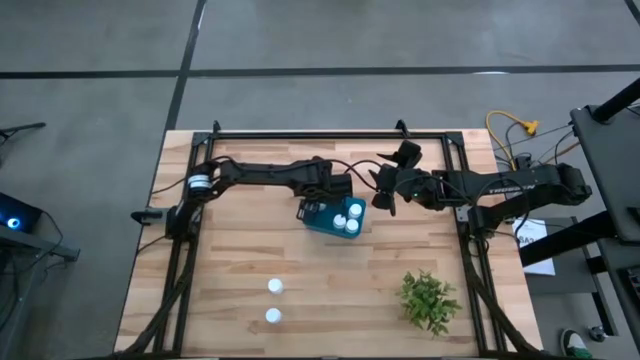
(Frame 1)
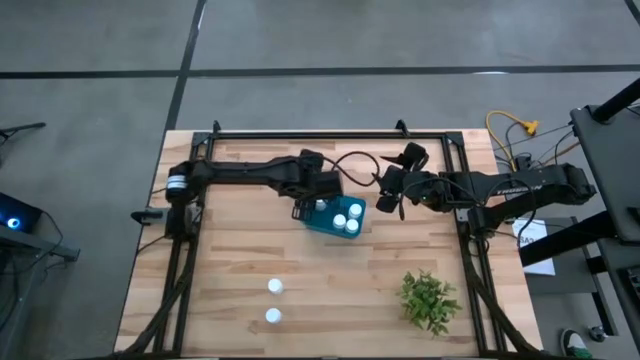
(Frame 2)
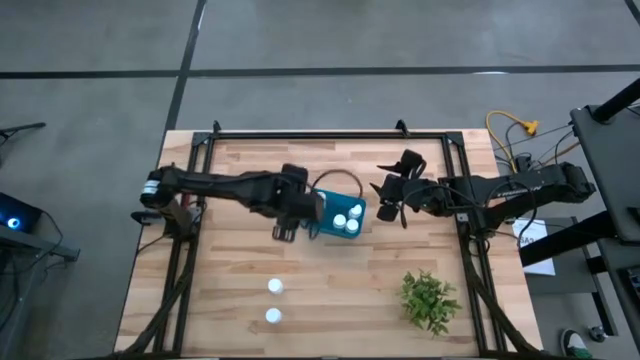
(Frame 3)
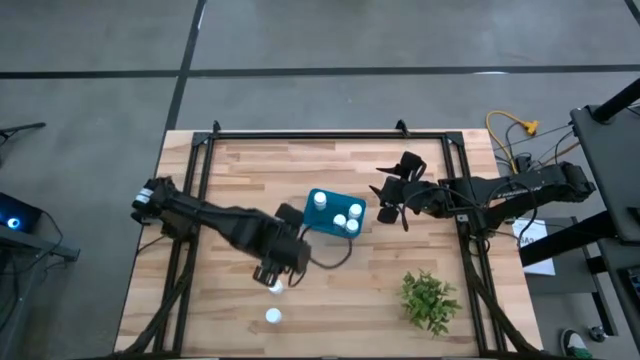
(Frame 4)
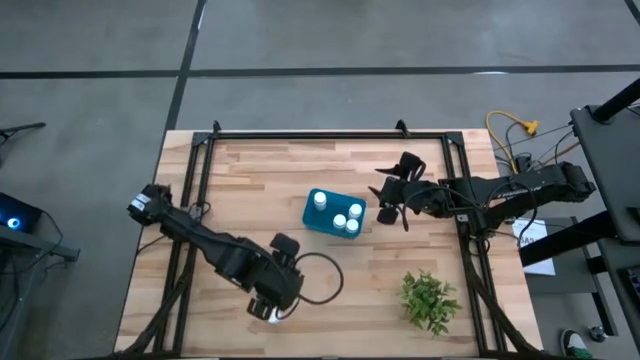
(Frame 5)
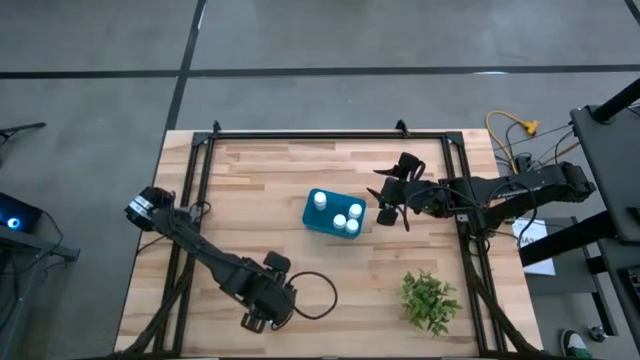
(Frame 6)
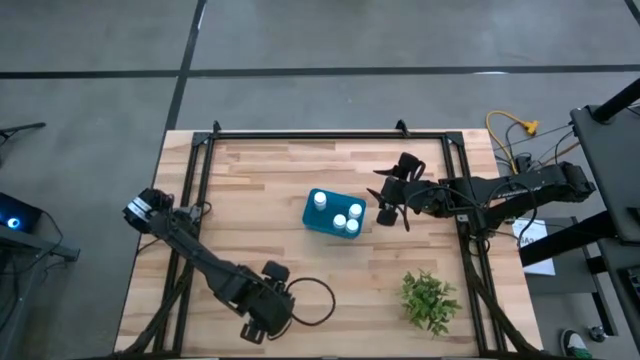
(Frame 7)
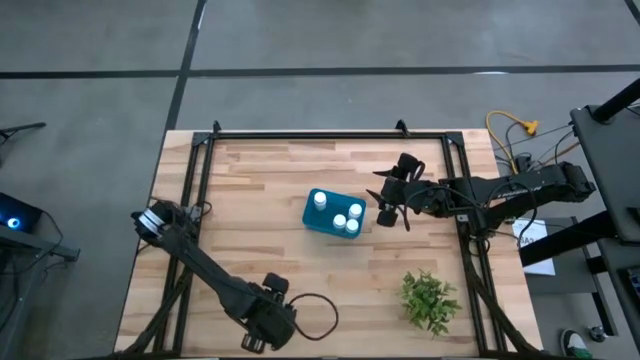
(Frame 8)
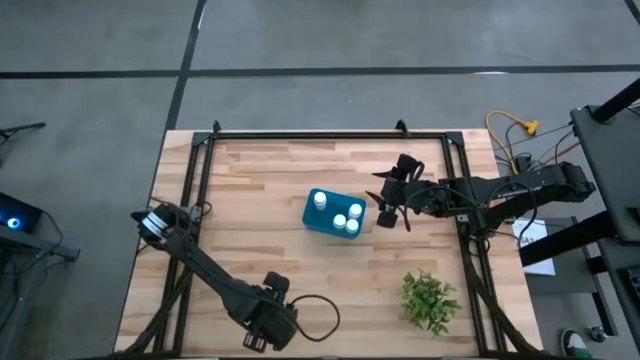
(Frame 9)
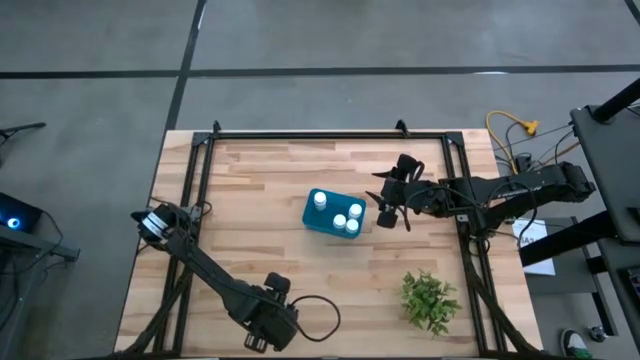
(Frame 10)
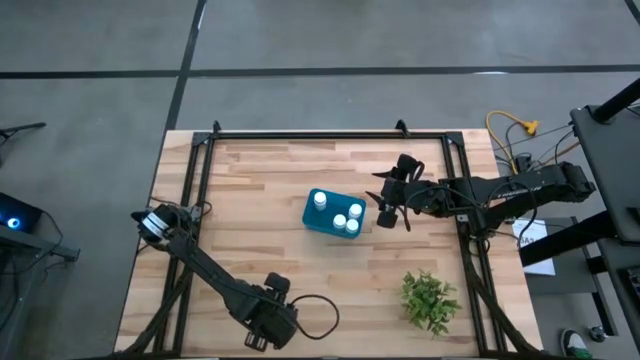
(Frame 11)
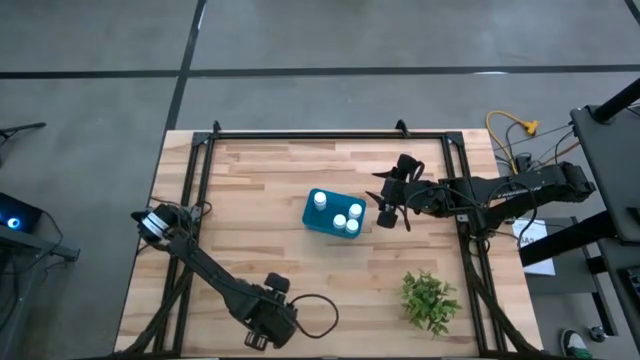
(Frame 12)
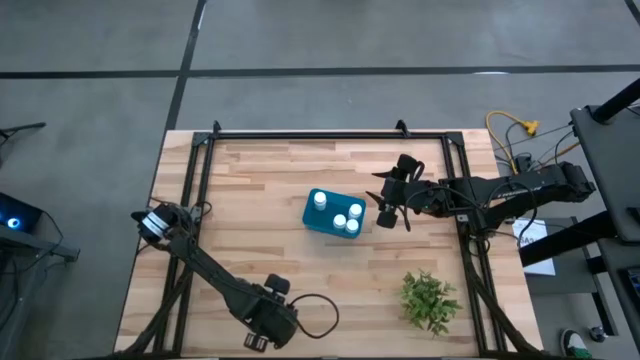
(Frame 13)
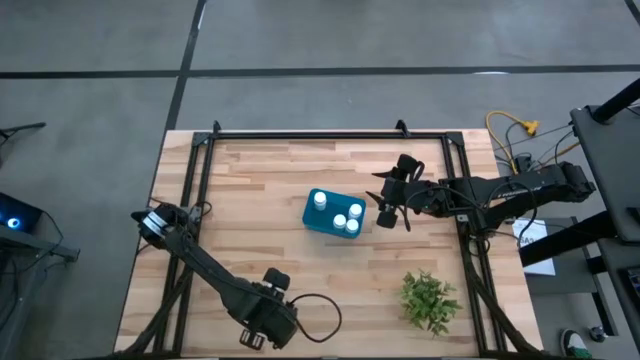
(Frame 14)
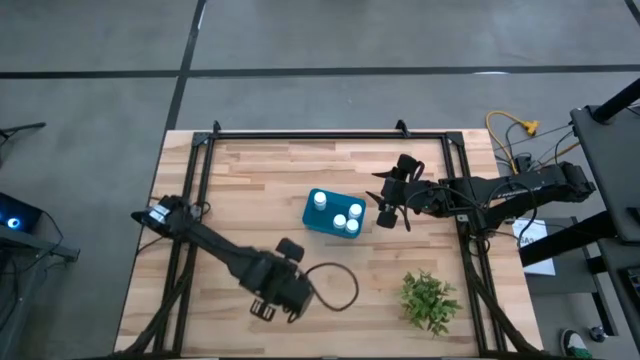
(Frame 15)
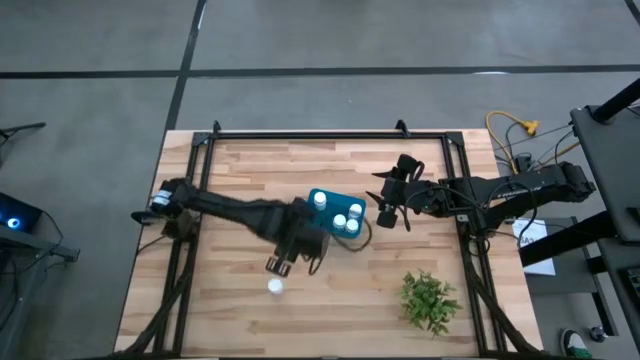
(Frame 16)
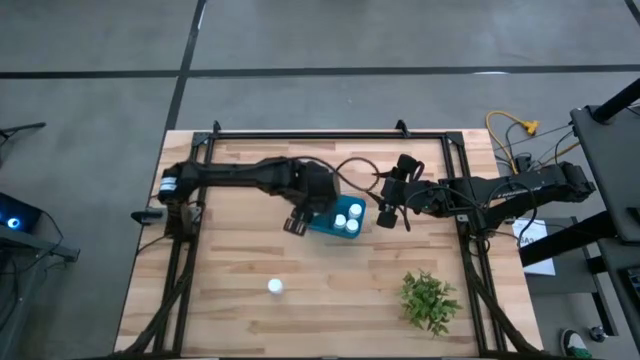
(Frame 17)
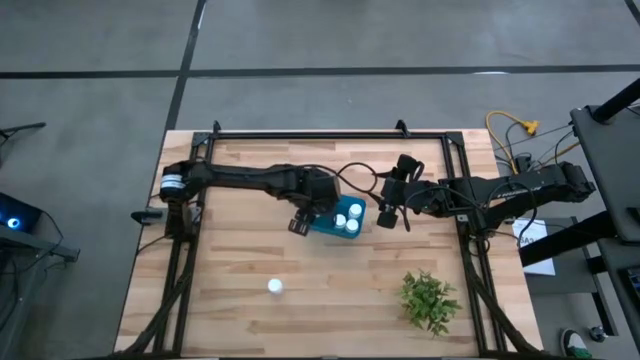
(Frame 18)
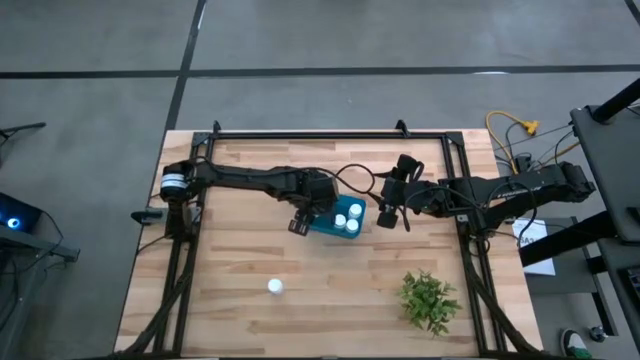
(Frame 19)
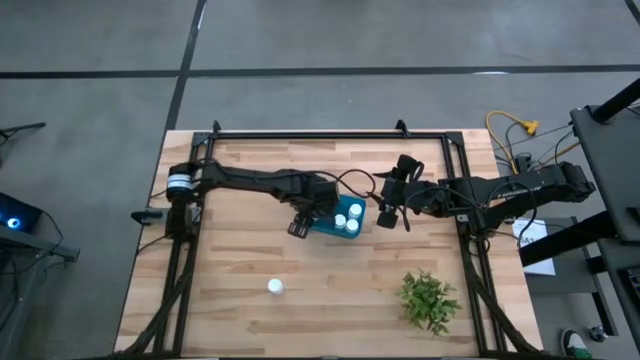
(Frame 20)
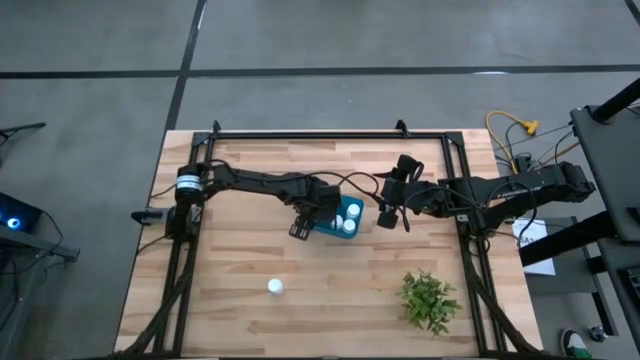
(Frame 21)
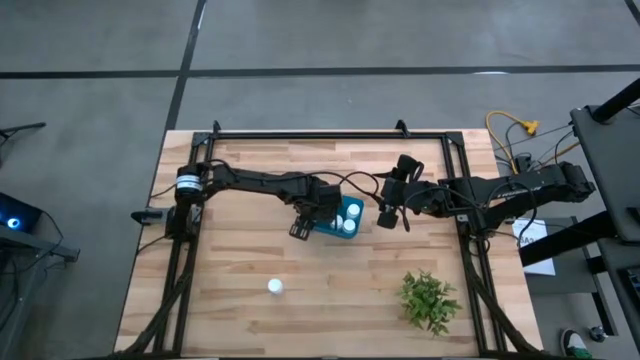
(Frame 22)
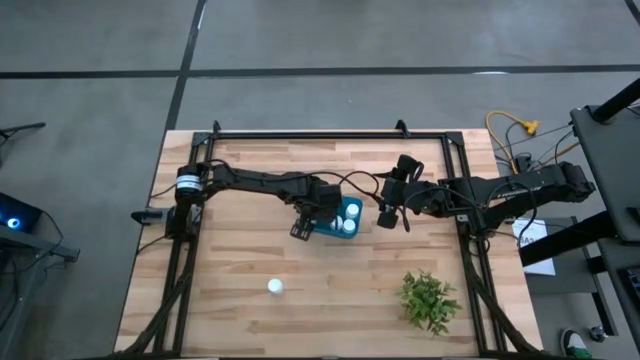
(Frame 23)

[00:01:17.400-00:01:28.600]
Task: Pick and place pill bottles into a basket
Put the white pill bottle into the blue bin

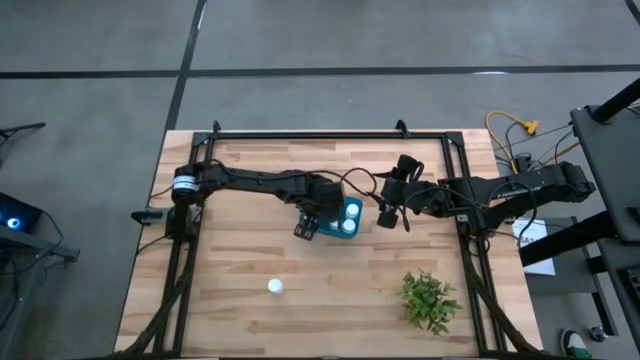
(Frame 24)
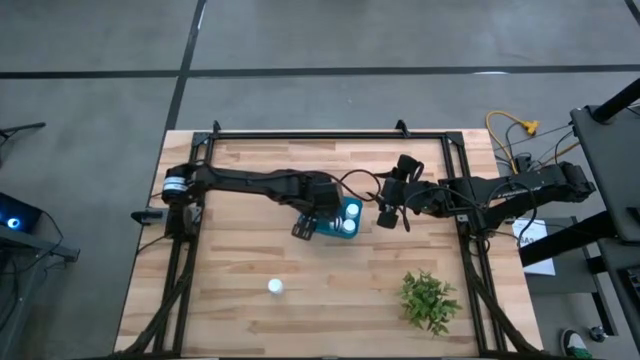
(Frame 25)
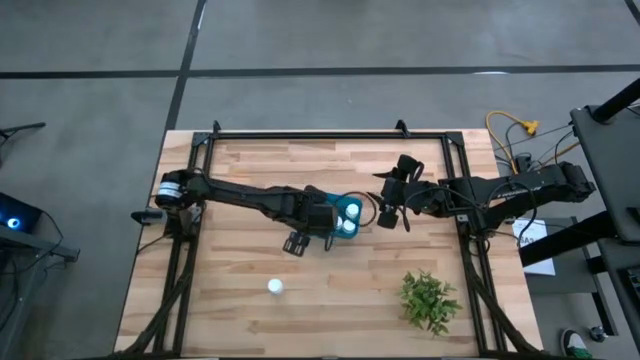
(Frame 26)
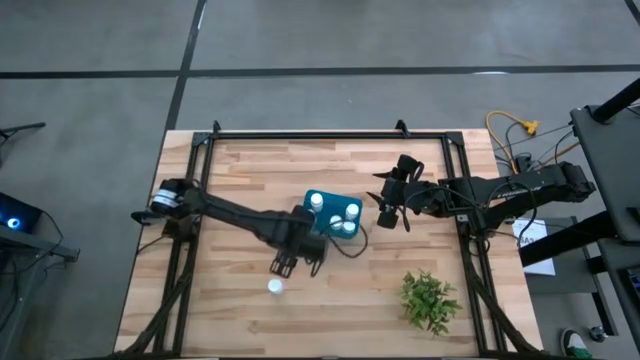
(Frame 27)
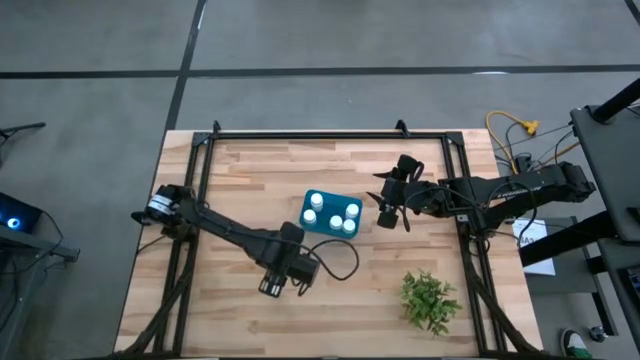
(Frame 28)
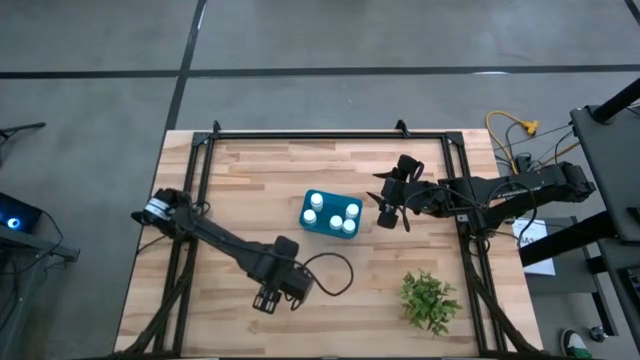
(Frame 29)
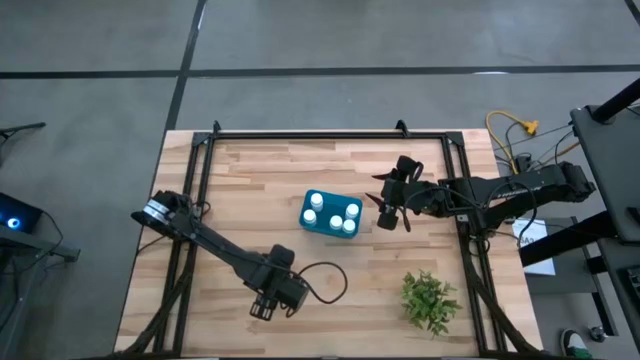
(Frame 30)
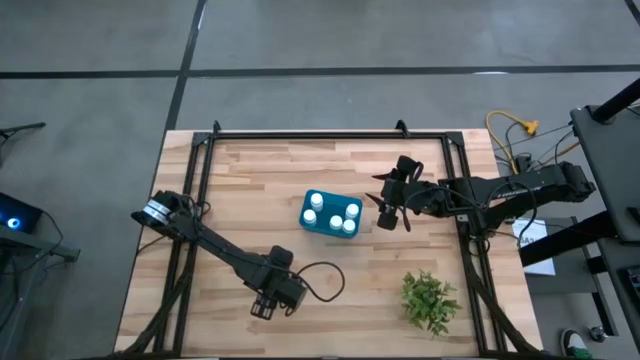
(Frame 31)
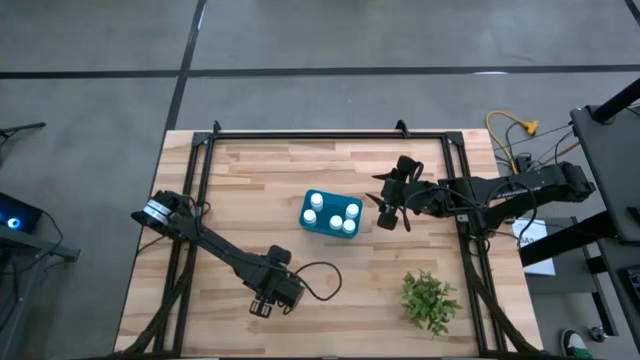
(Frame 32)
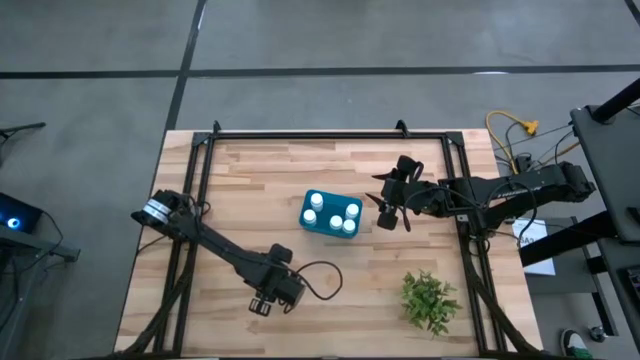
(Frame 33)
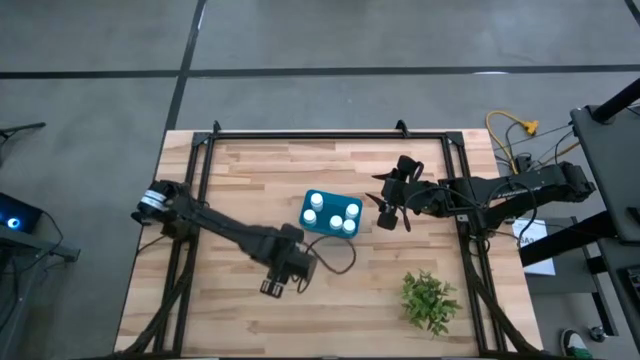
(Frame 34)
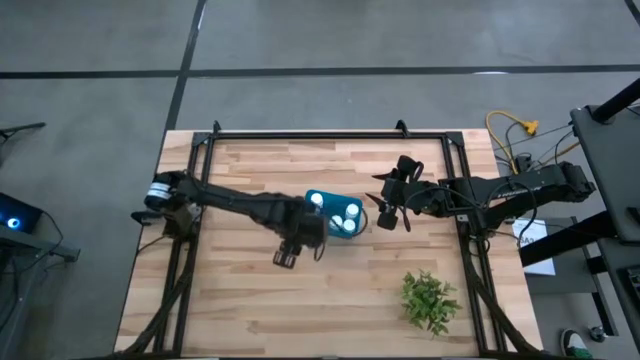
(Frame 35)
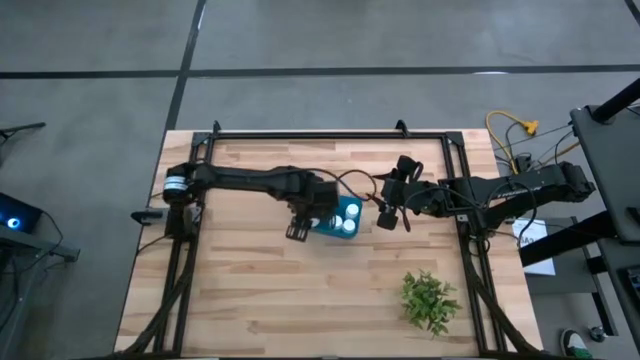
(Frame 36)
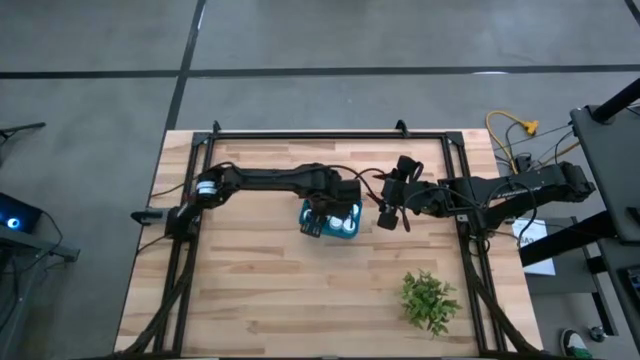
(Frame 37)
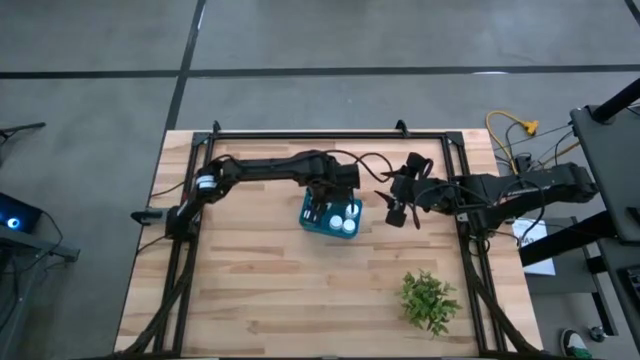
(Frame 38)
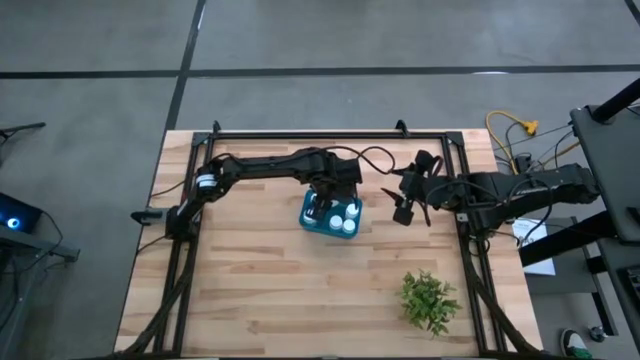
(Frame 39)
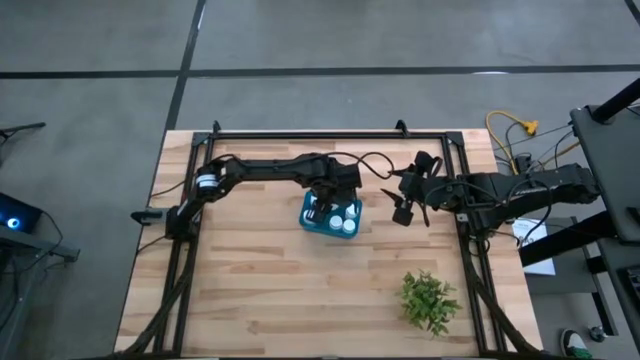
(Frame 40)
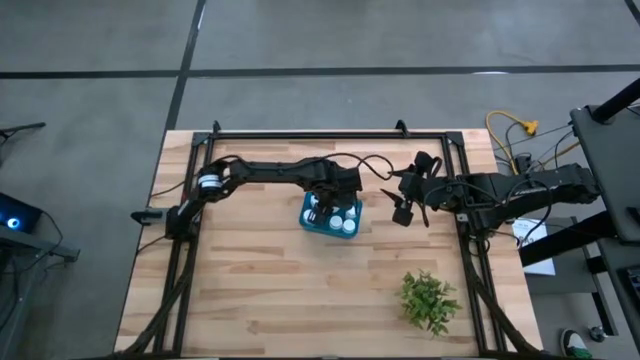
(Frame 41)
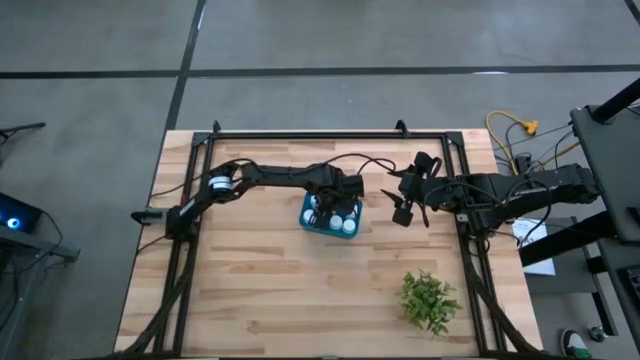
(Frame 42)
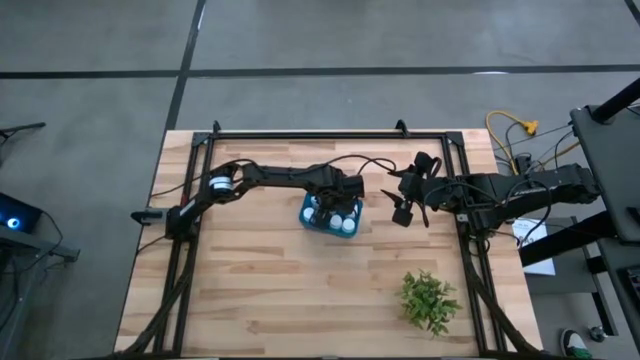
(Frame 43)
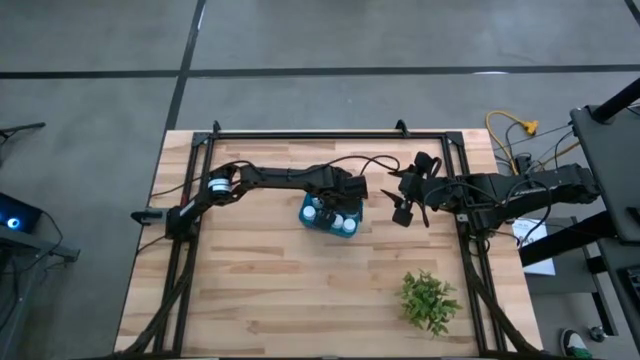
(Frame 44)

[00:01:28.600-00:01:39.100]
Put the white pill bottle into the blue bin
